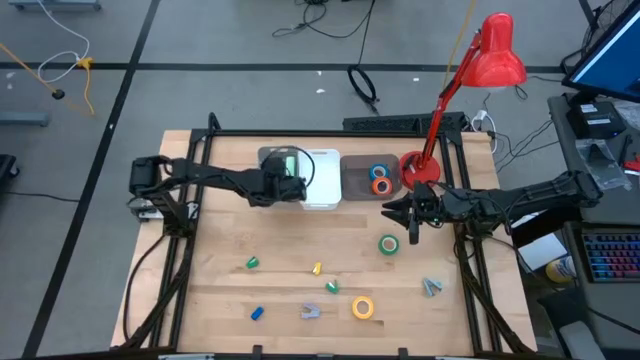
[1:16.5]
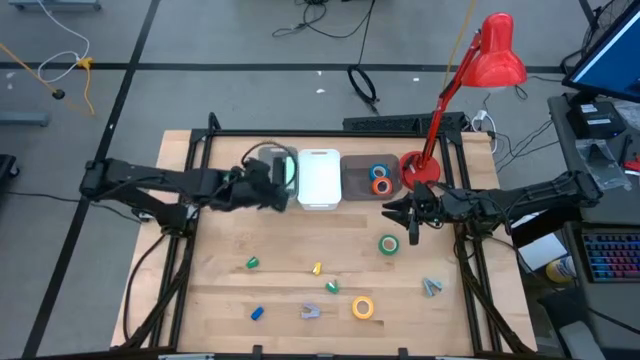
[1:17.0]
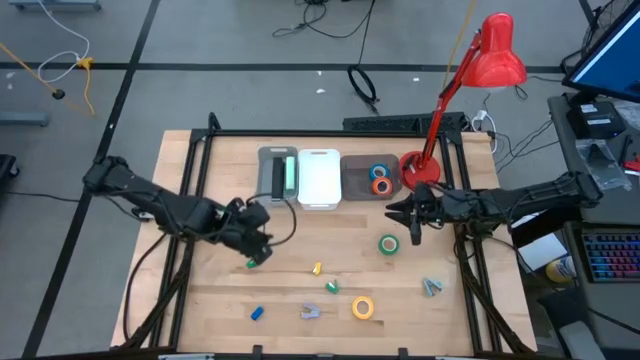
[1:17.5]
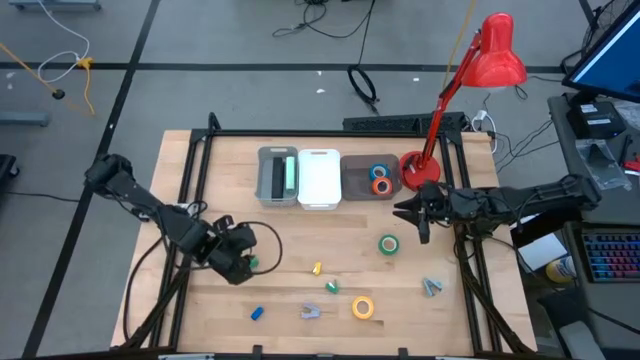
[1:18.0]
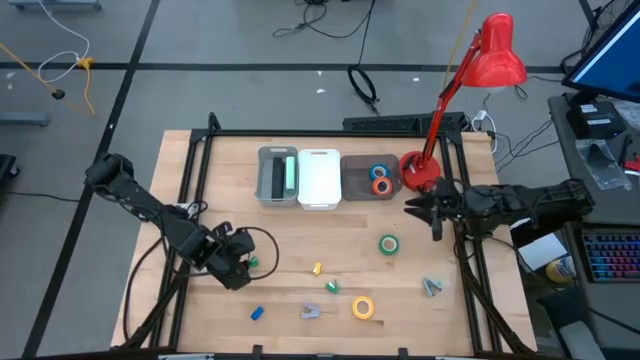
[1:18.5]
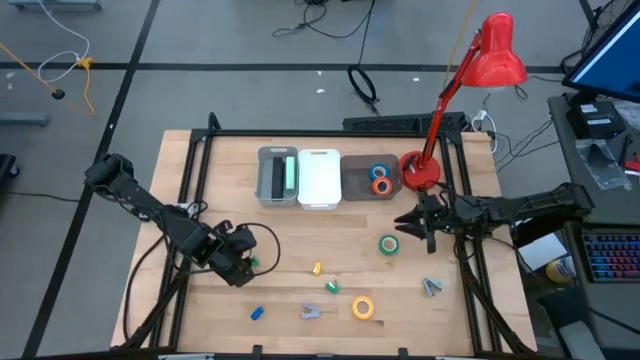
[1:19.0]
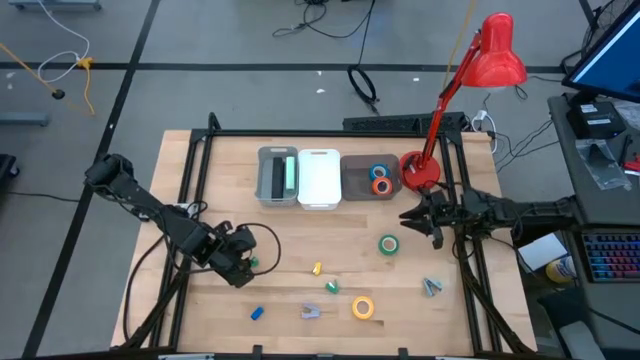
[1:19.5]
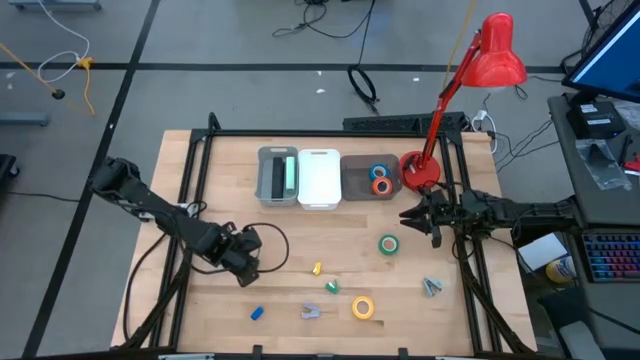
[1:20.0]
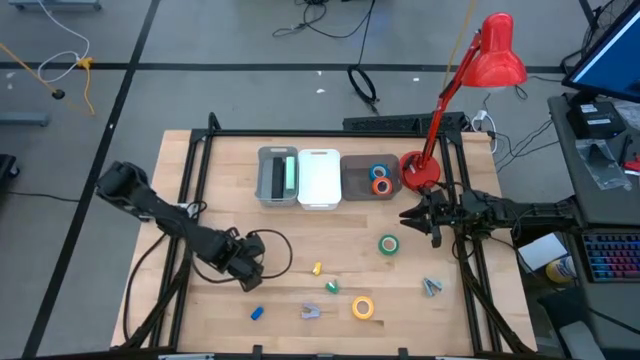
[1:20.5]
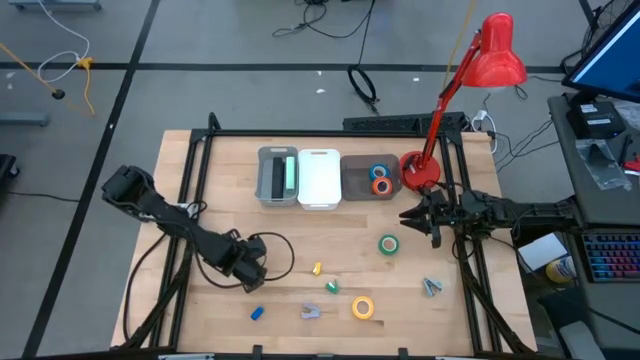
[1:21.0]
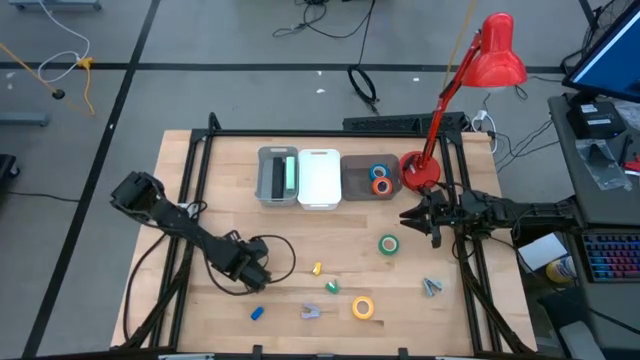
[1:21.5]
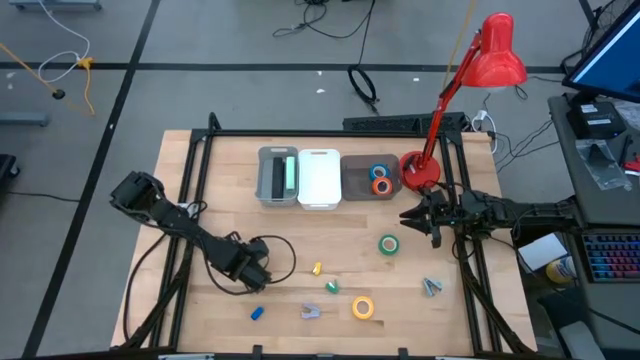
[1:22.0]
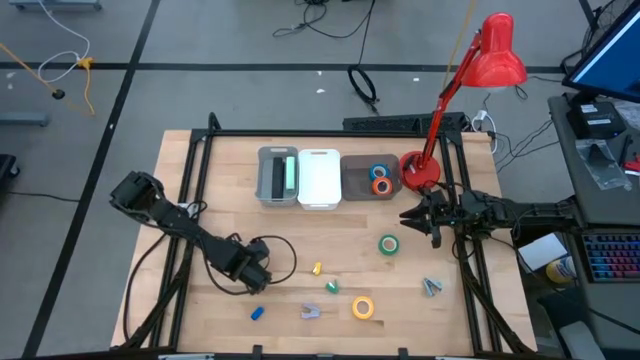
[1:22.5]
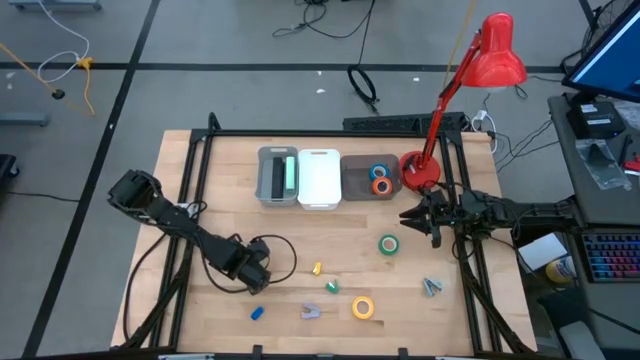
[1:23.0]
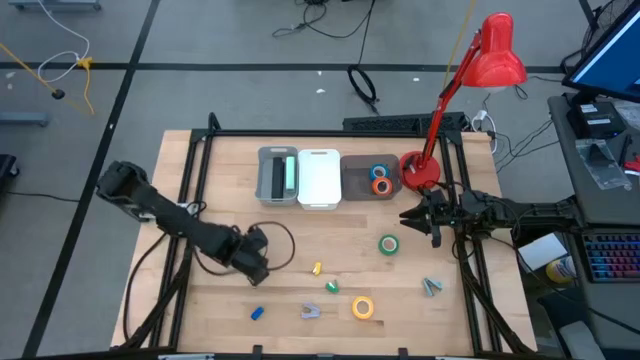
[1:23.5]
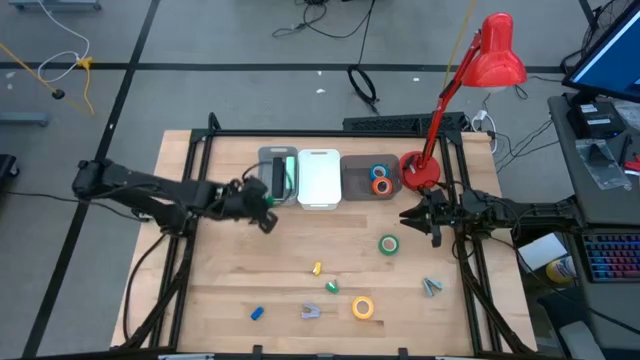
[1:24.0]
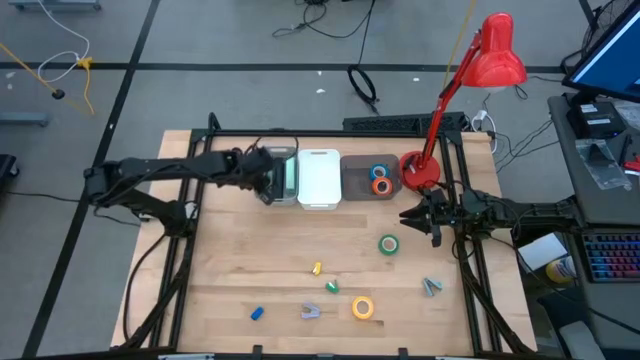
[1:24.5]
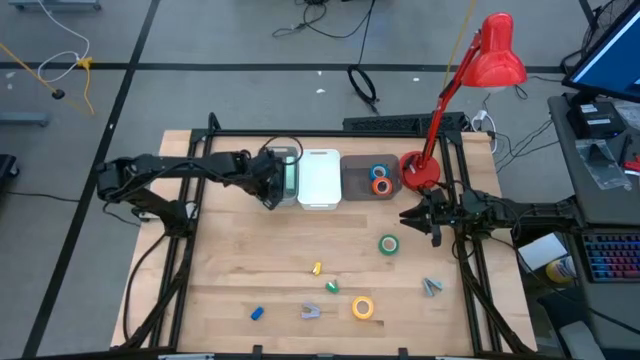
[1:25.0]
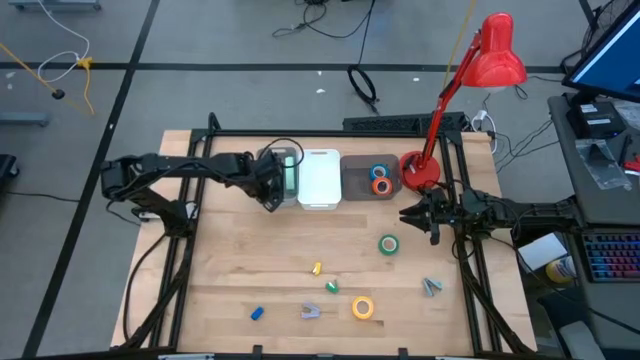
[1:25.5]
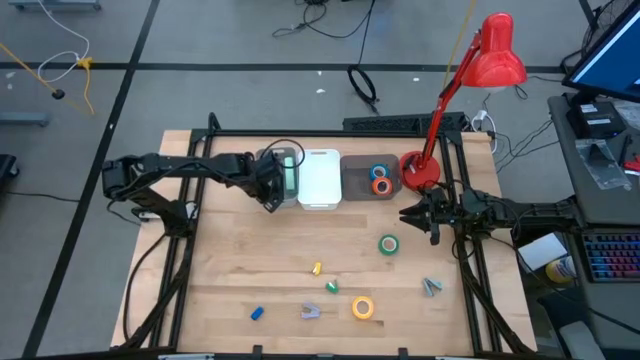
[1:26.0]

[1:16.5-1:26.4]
Task: Pick and place Stapler, Stapler remover, tape
Put the small green stapler into the grey bin

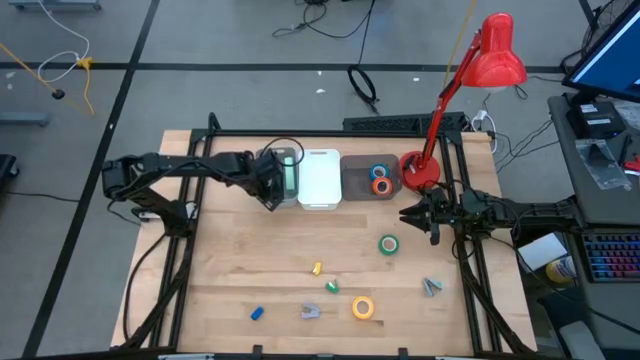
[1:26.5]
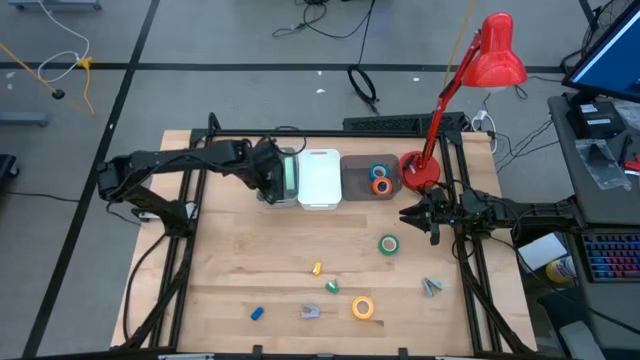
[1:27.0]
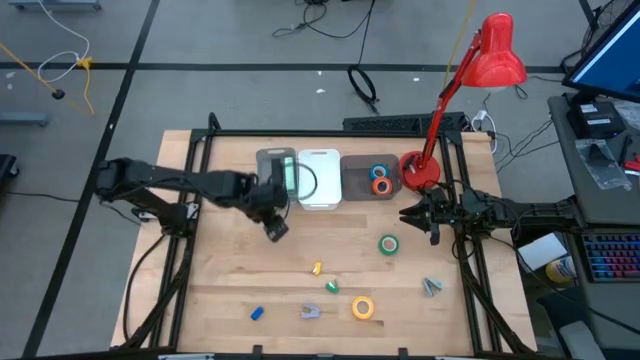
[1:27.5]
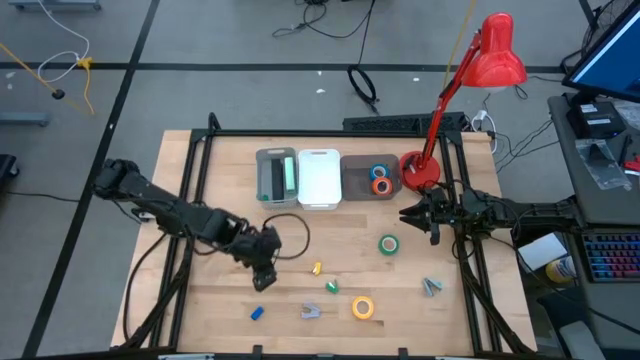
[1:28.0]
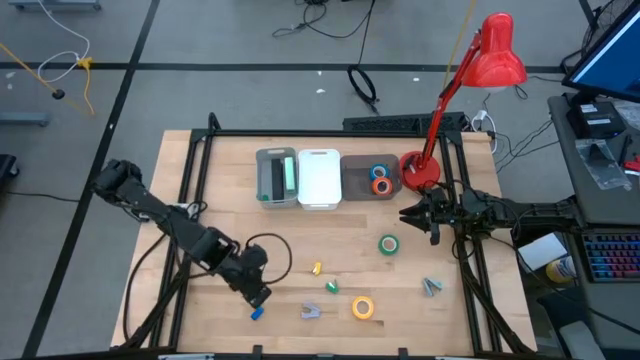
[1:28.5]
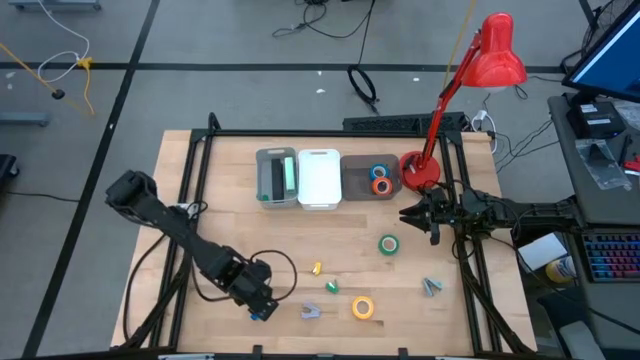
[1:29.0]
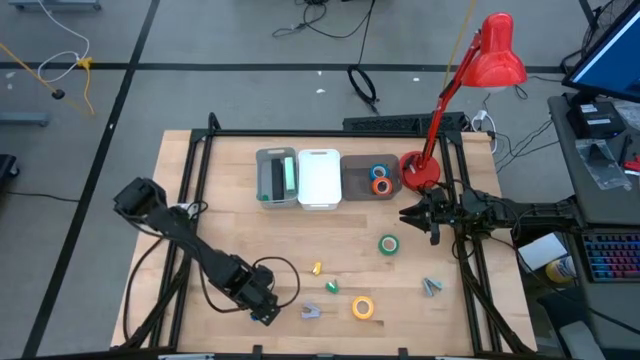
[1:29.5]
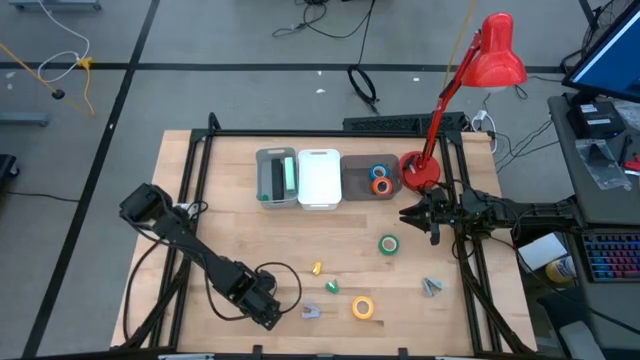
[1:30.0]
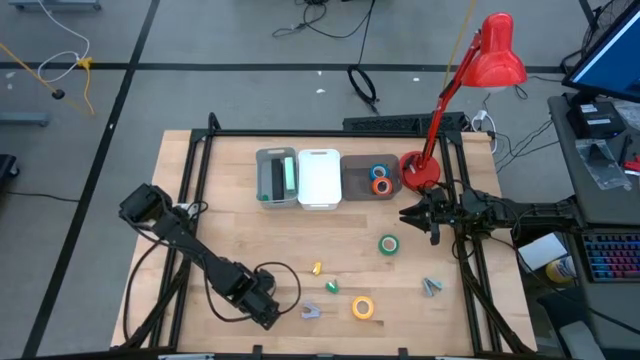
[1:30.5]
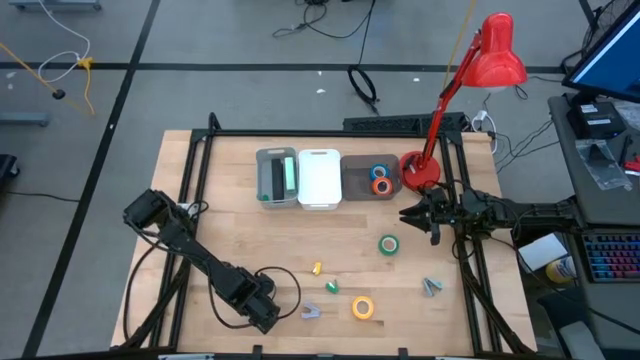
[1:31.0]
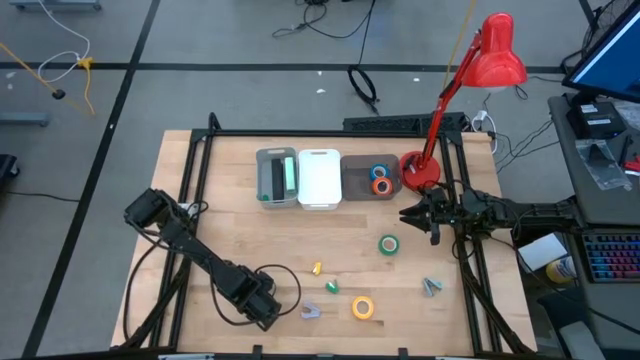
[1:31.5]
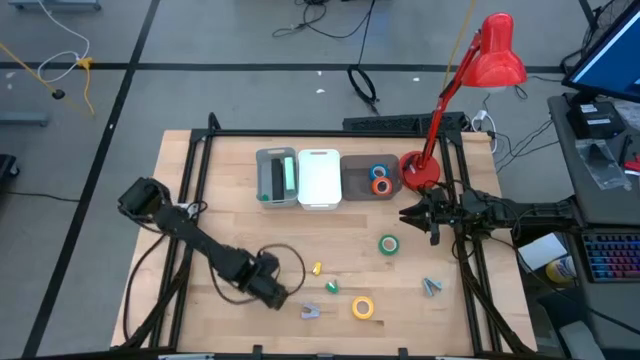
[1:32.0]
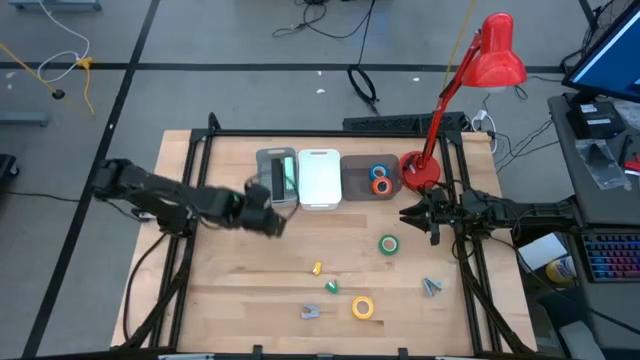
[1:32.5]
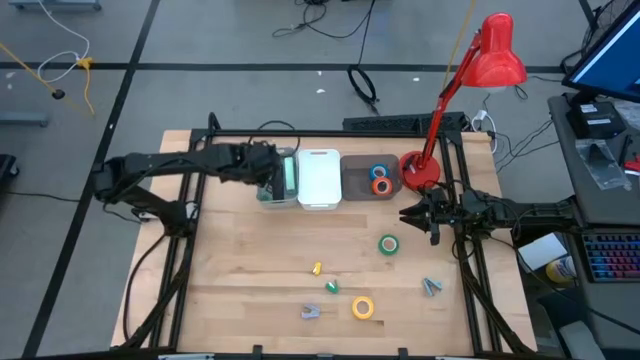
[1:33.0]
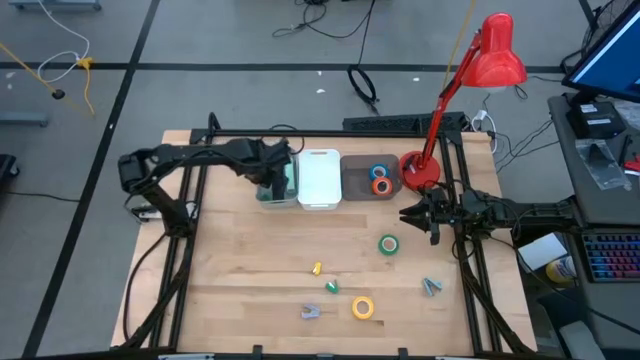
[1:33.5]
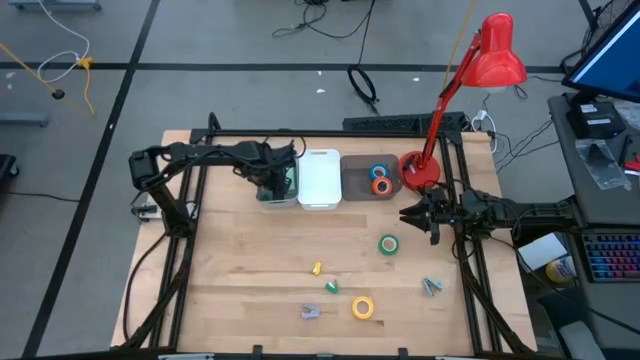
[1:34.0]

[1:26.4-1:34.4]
Put the small blue stapler into the grey bin

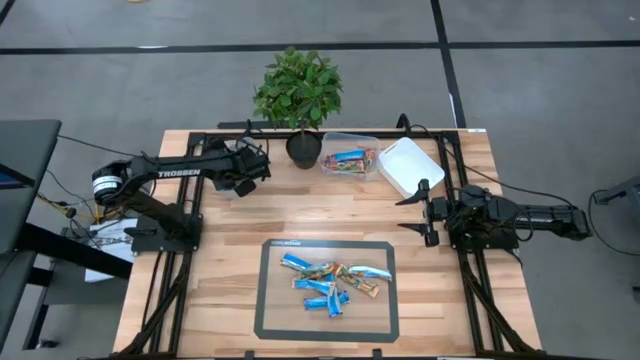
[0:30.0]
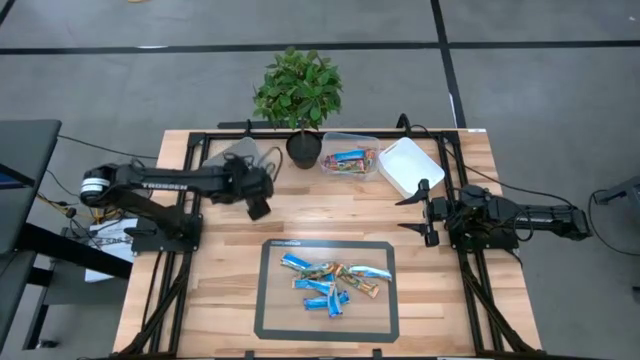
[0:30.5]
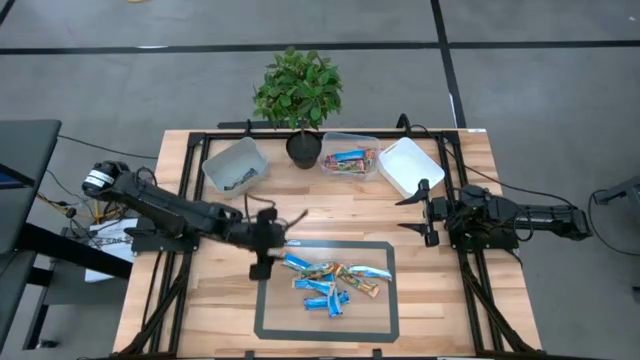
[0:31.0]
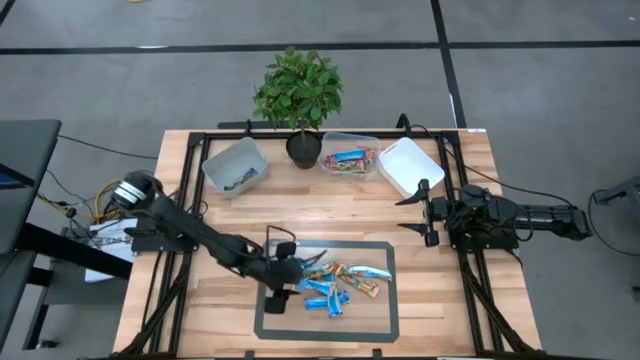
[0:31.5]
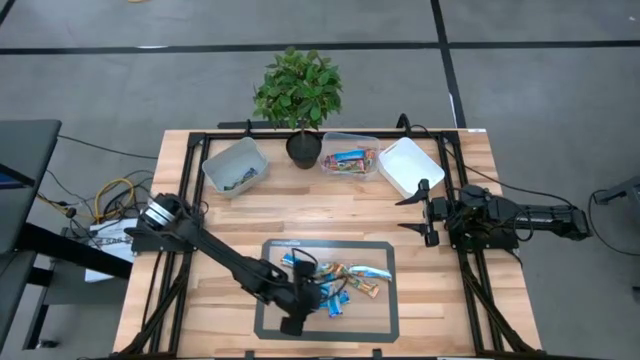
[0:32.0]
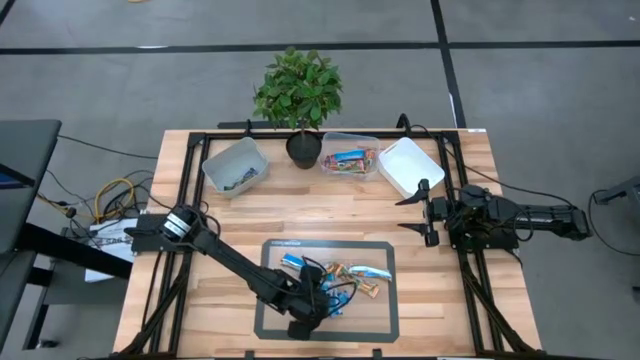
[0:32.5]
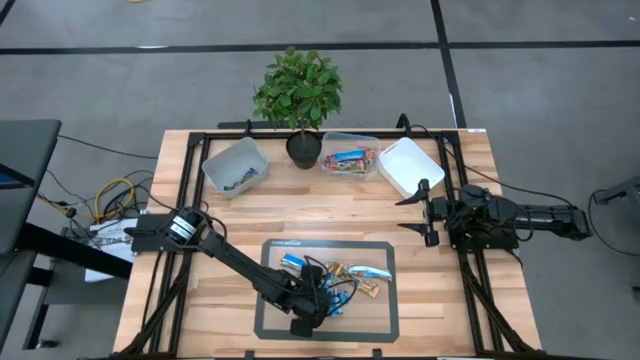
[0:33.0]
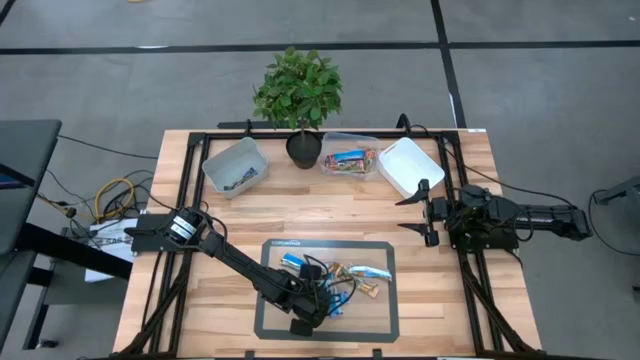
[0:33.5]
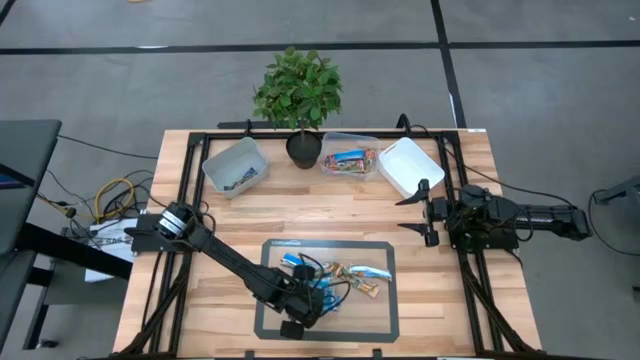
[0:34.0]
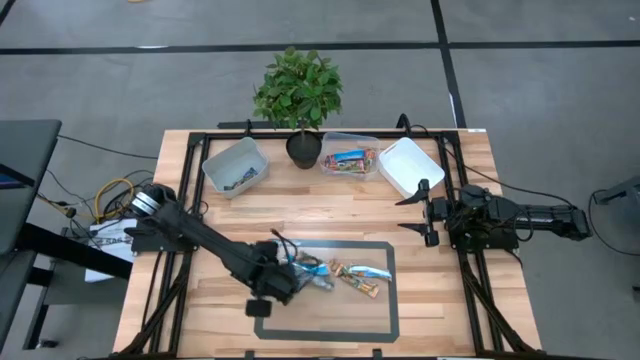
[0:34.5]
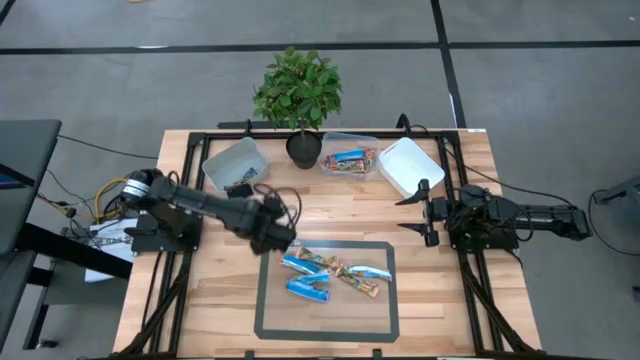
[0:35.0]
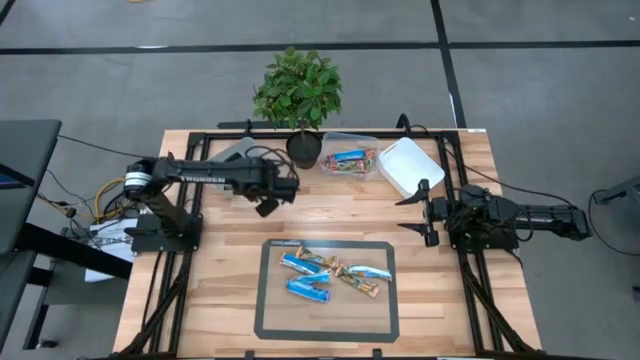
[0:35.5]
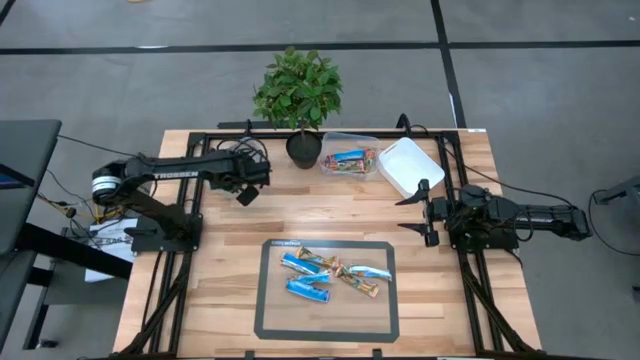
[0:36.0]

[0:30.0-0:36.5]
Task: Pick and place Granola Bars by type
Put the blue granola bar into the gray bin
